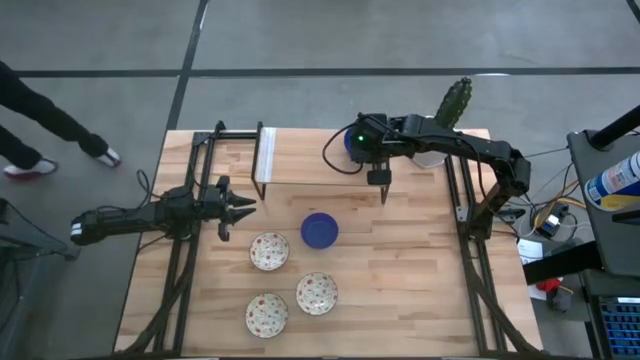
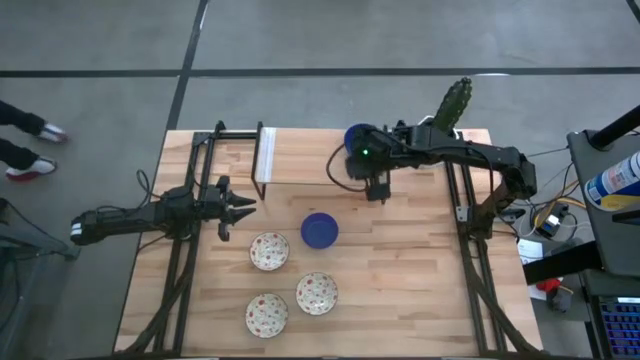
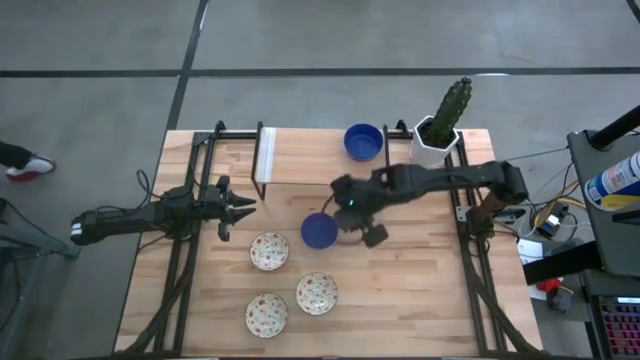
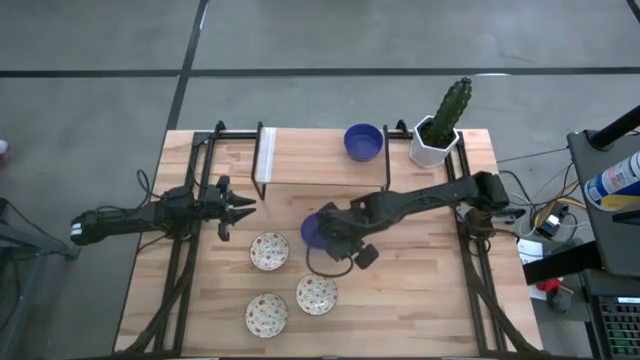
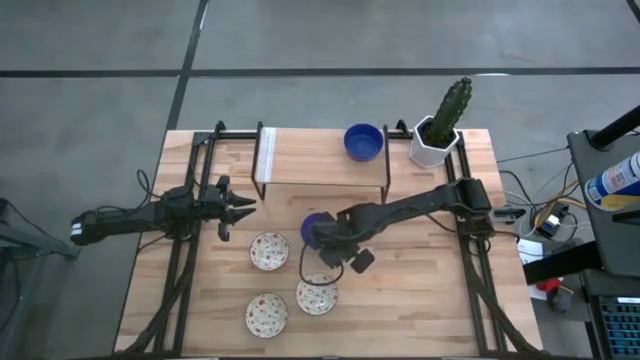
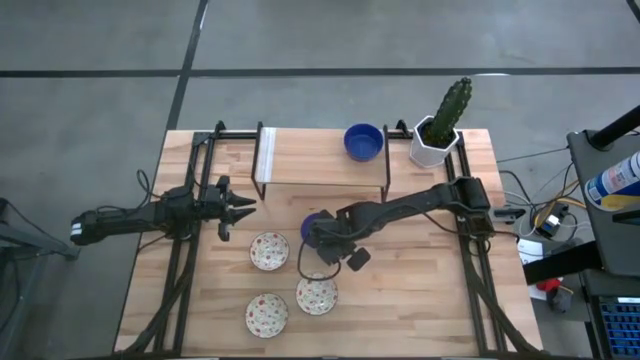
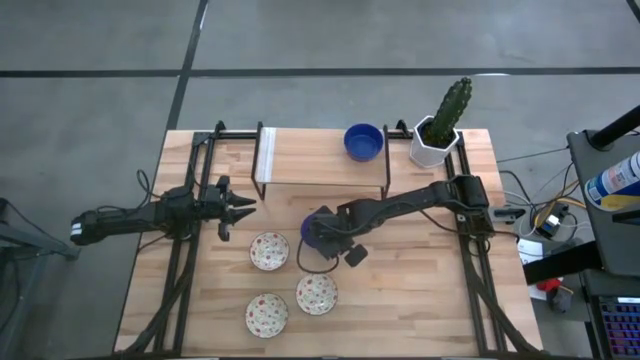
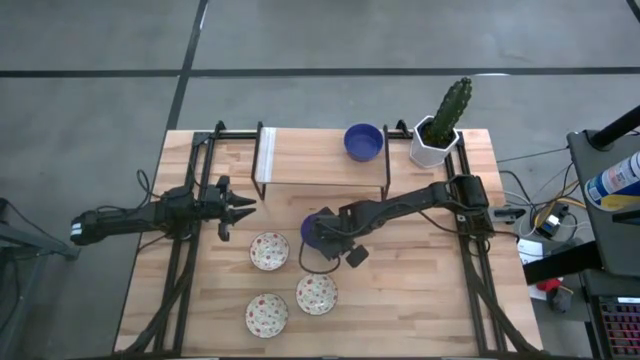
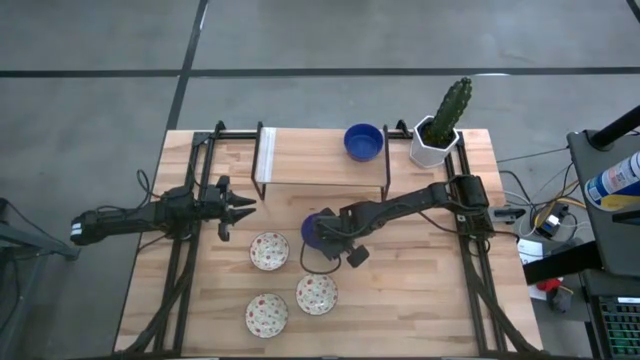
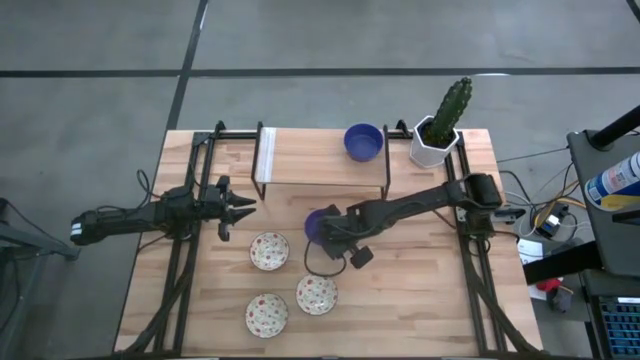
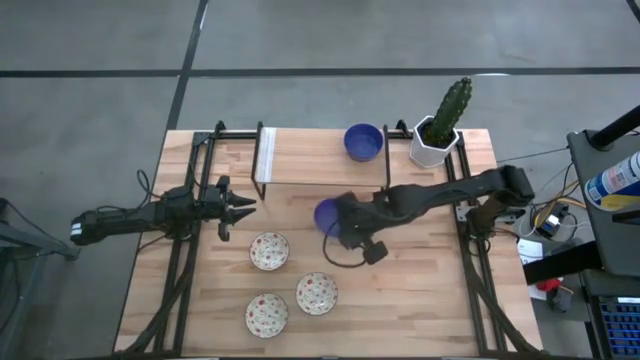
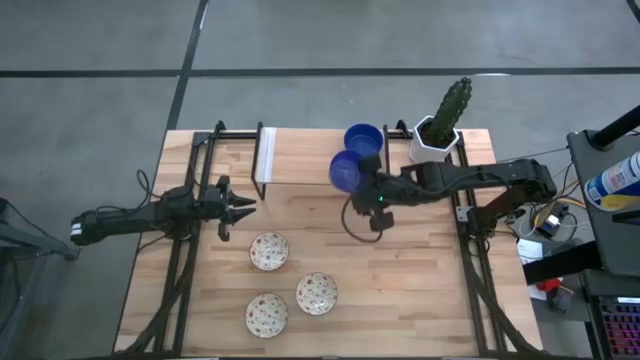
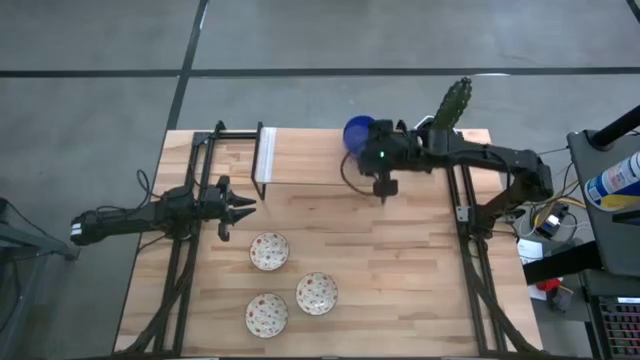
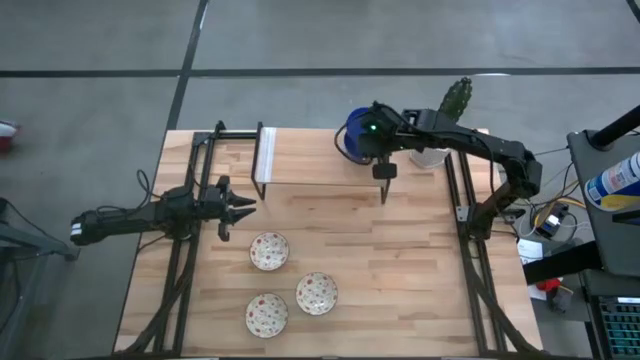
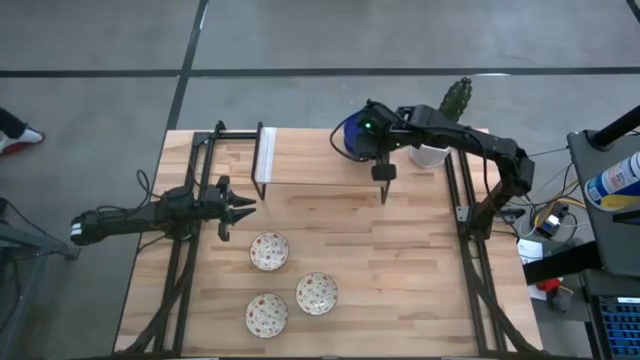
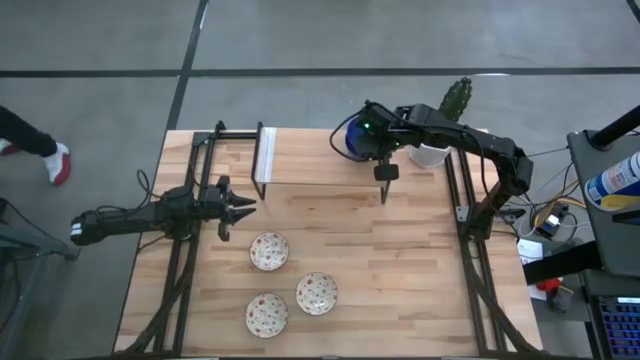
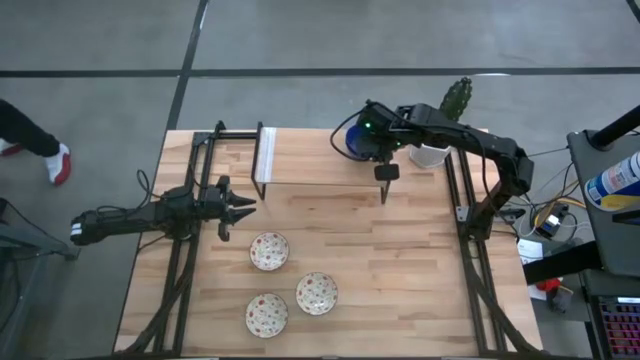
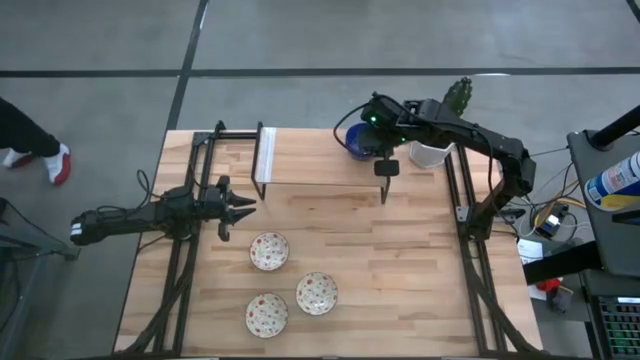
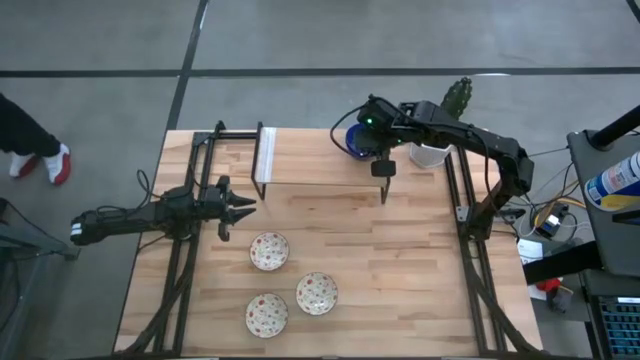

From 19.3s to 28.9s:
Task: Pick & Place Mini bowls
Stack the violet bowl on top of the violet bowl on the shelf

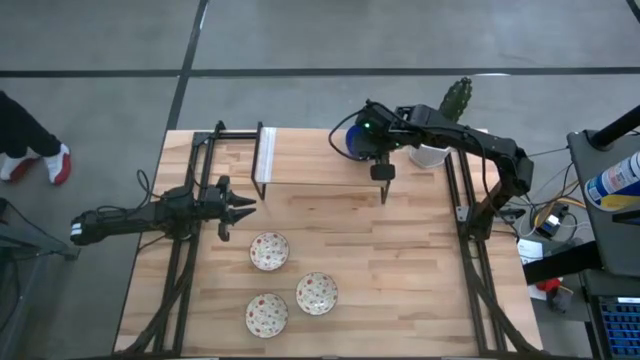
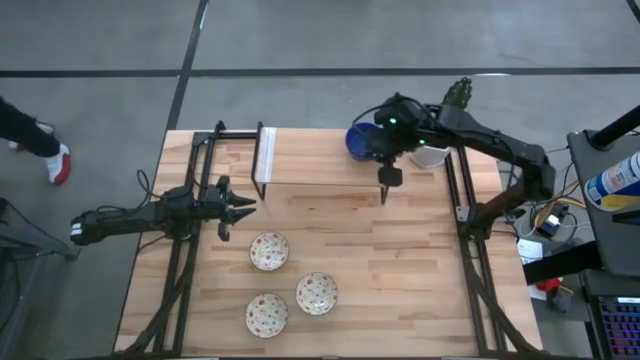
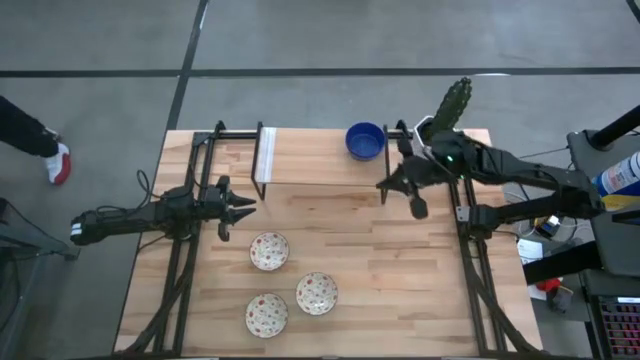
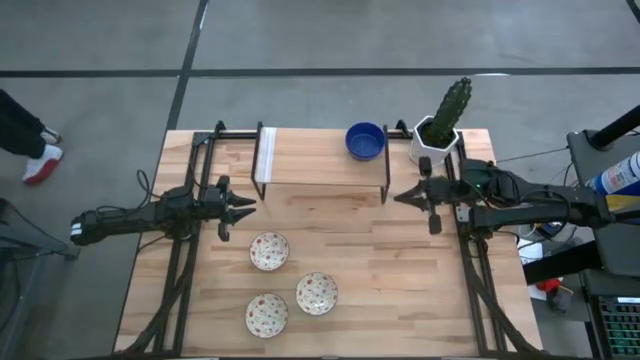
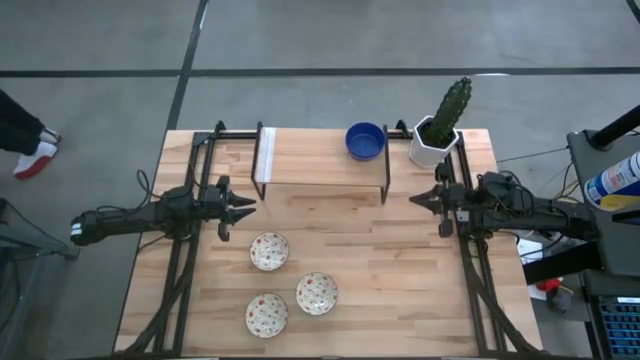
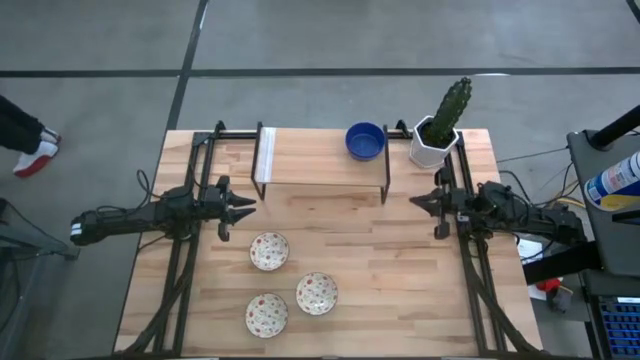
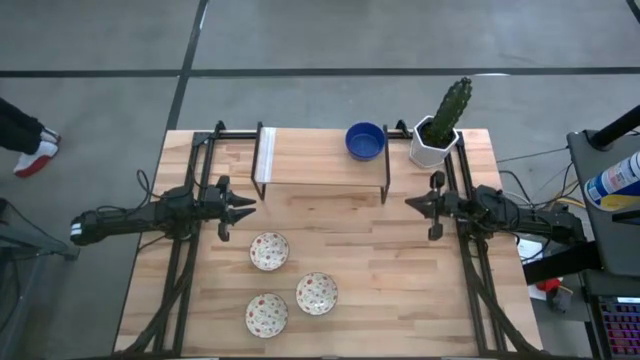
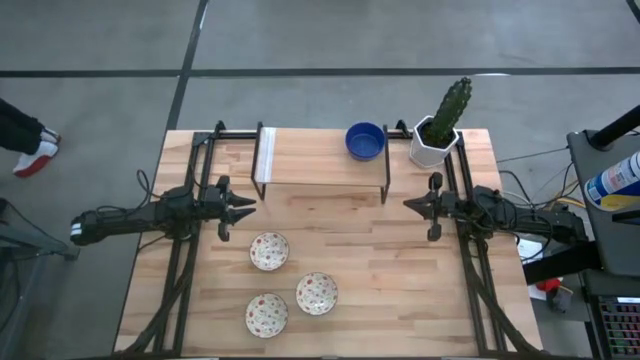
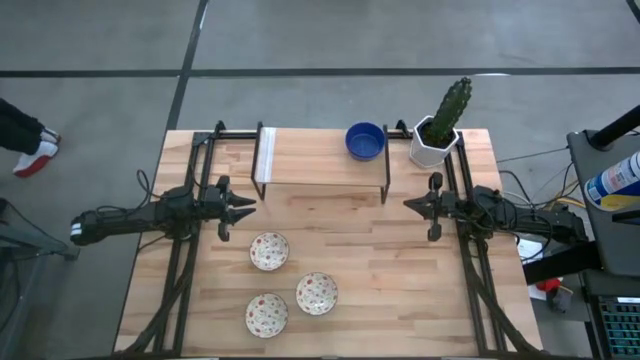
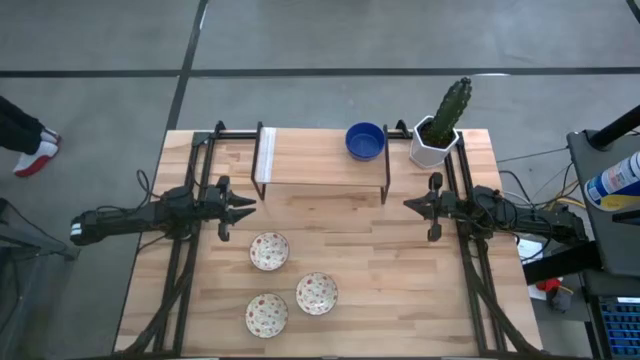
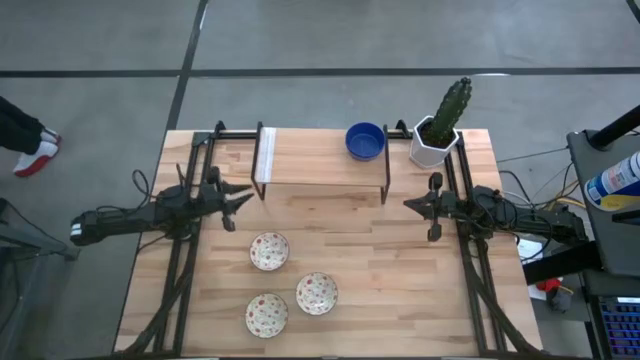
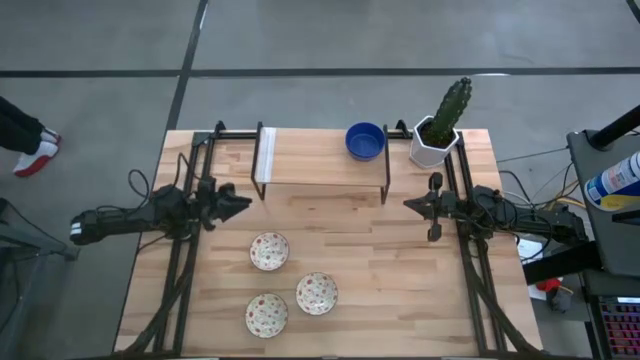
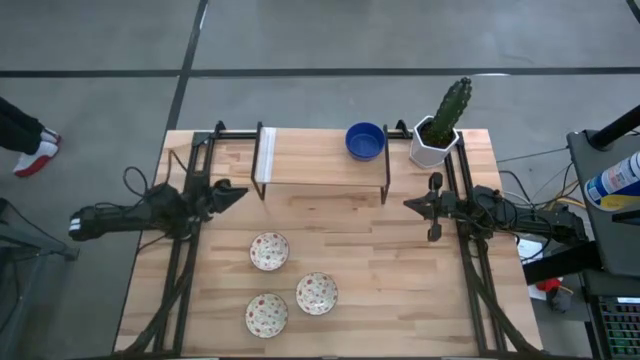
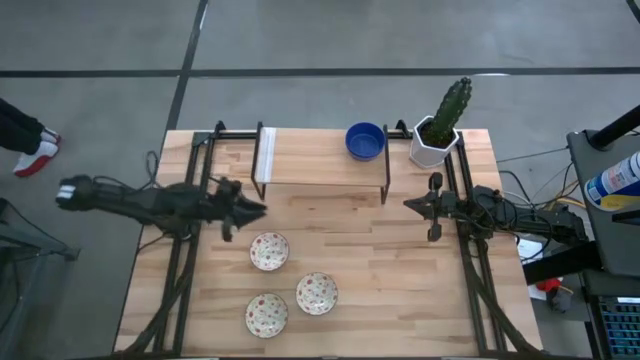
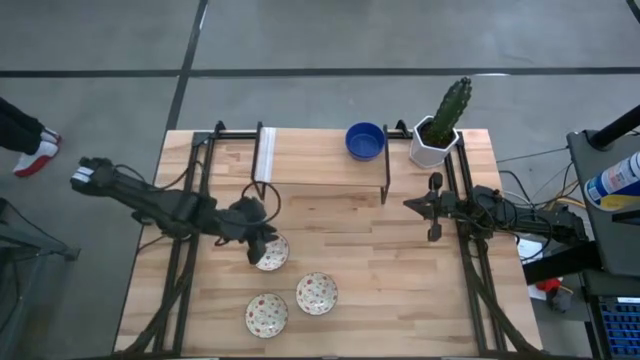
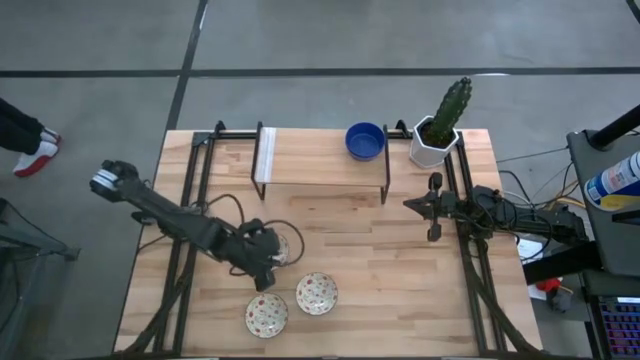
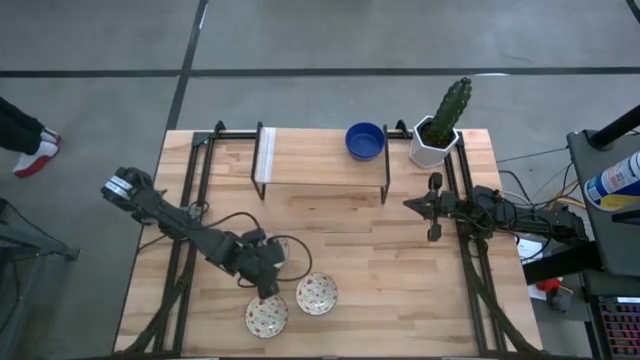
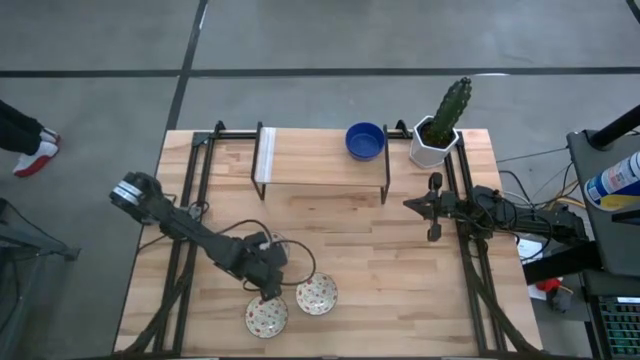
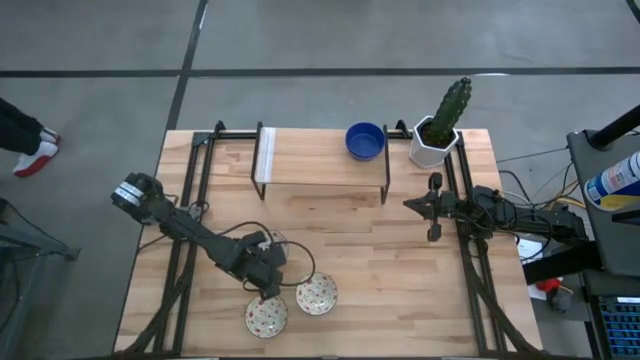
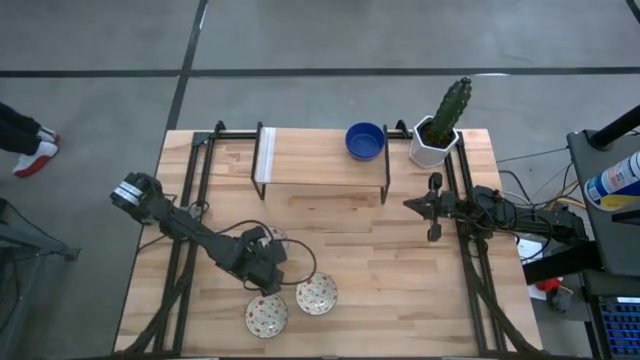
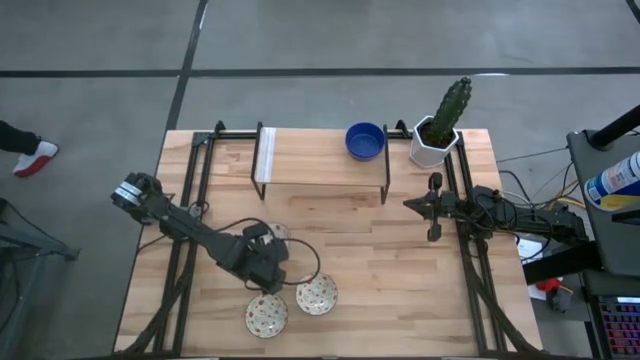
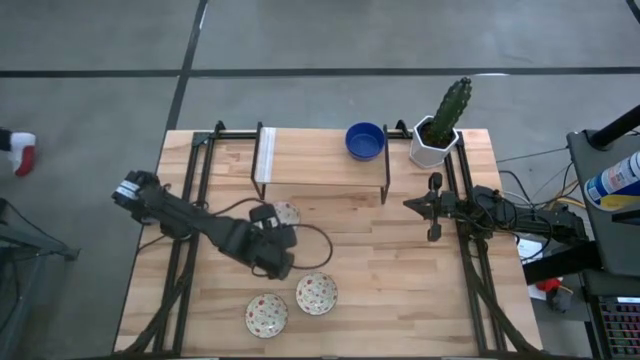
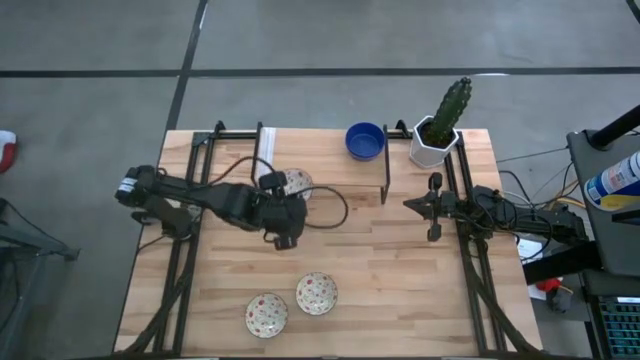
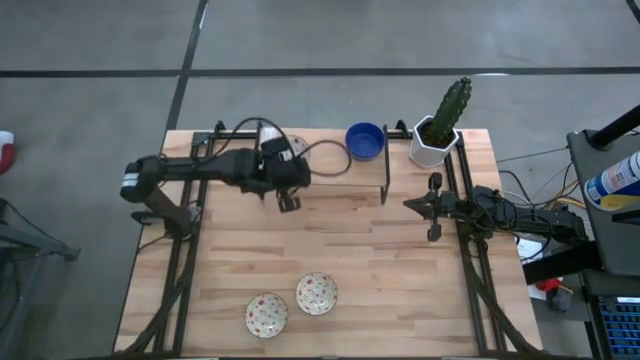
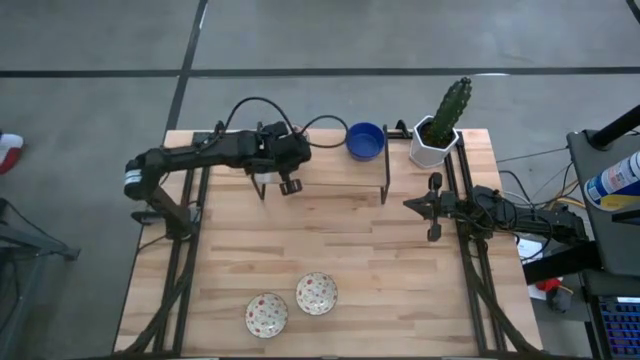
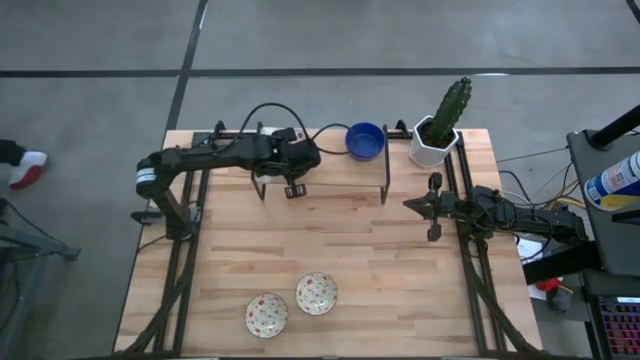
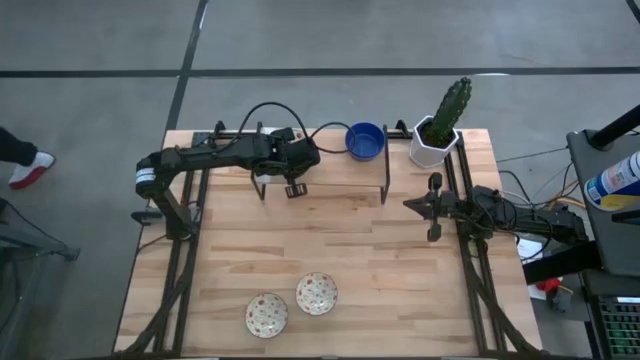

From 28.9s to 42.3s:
Put the top white bowl on the shelf
